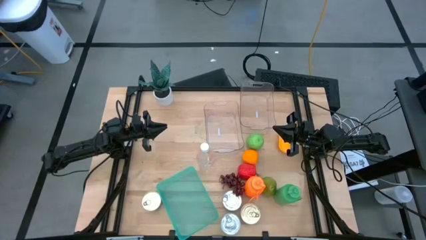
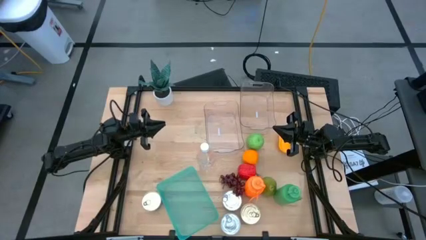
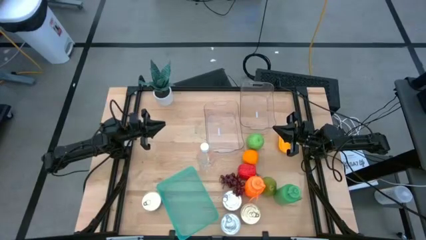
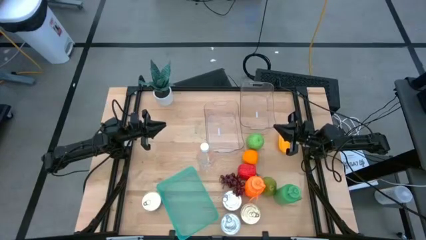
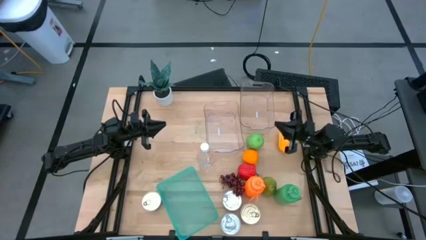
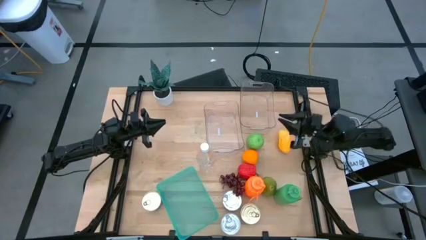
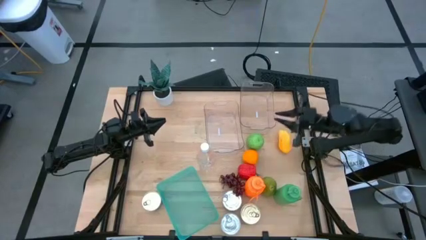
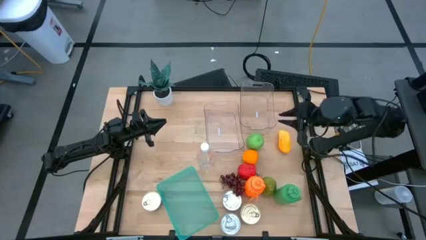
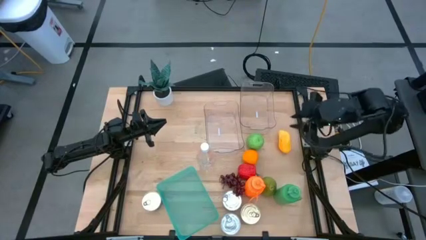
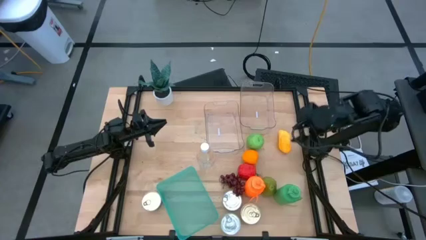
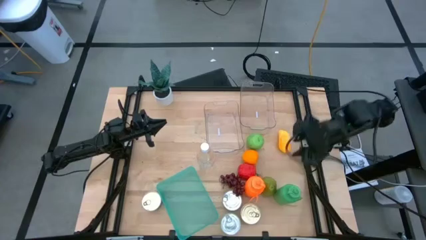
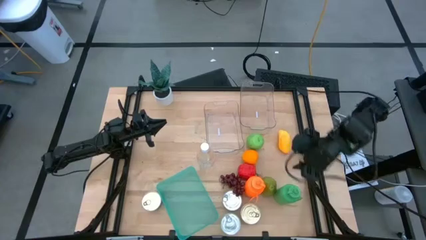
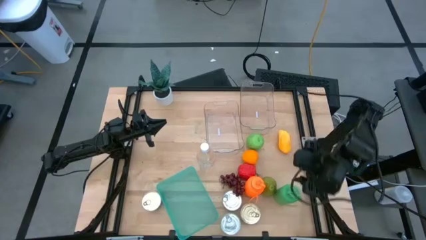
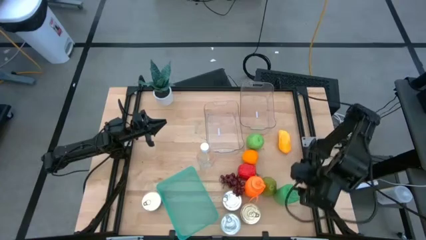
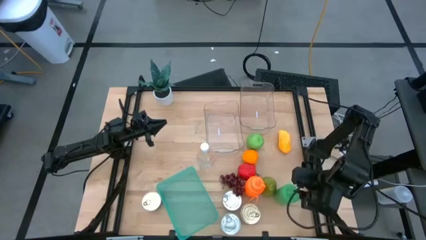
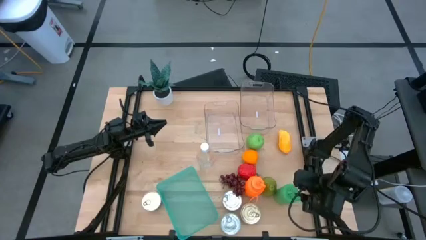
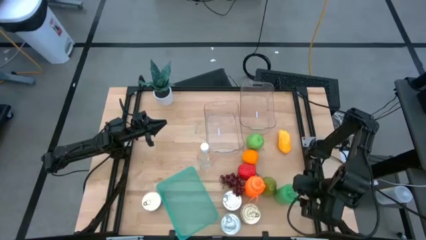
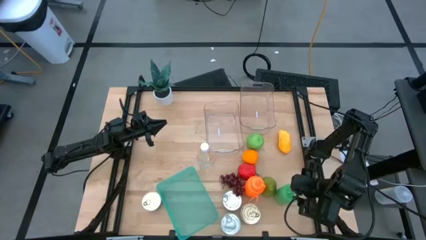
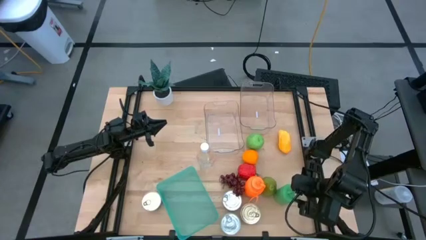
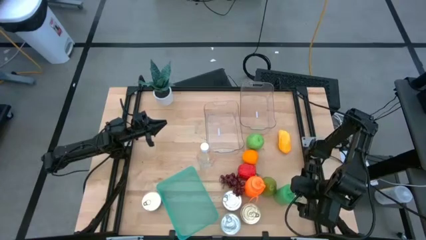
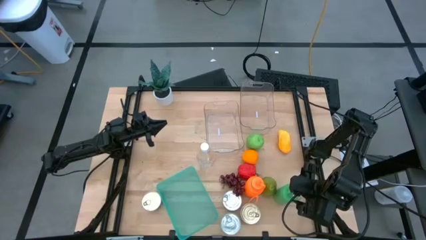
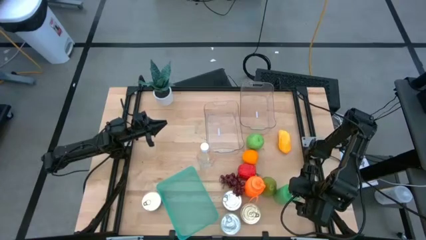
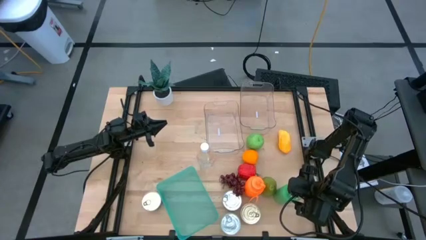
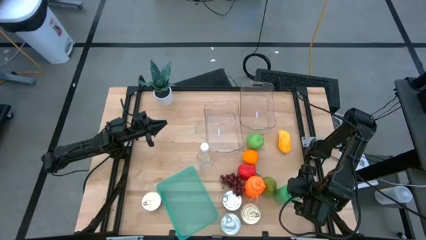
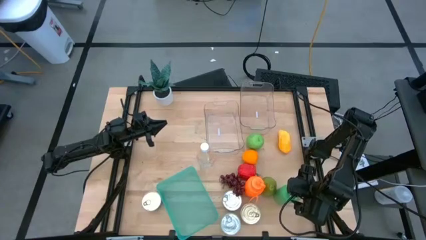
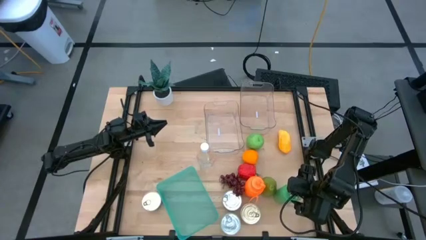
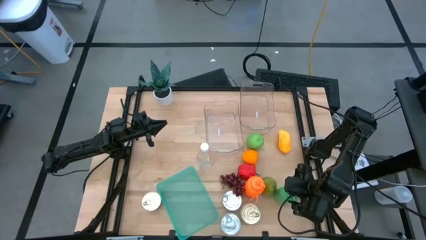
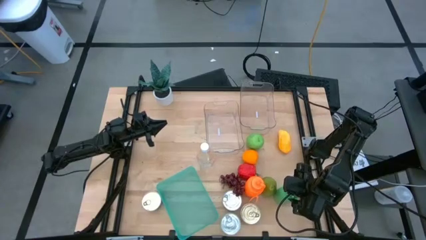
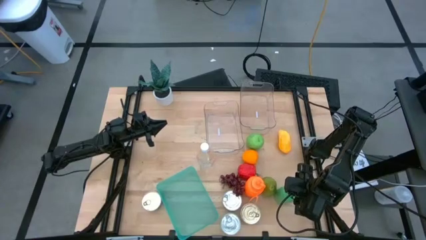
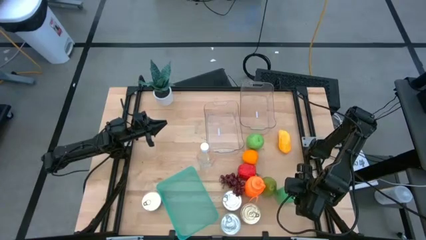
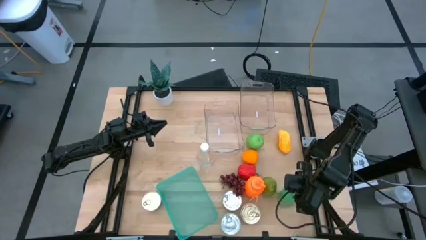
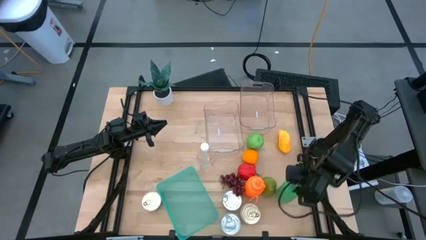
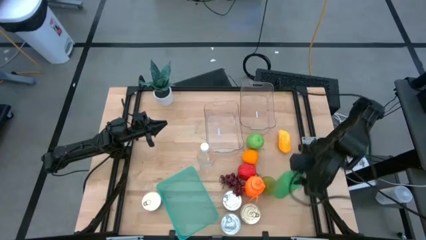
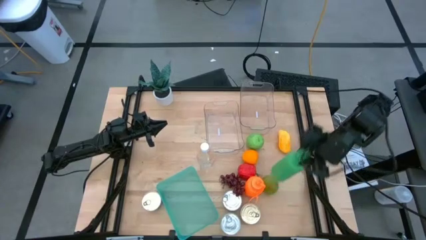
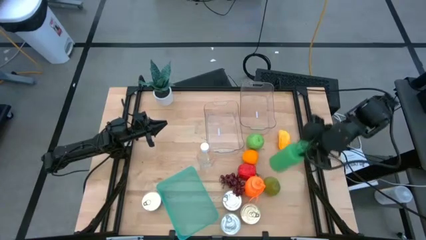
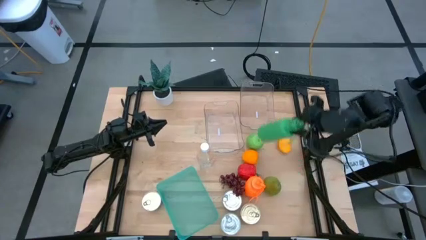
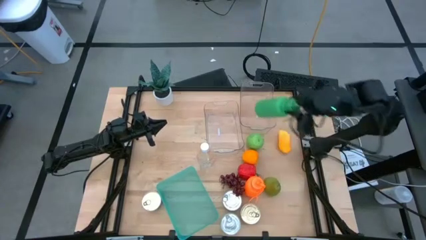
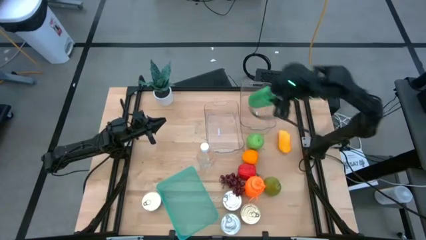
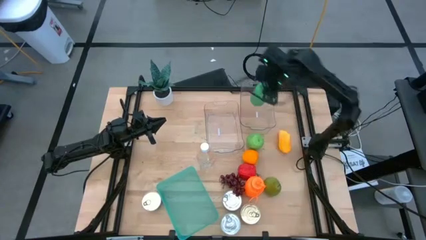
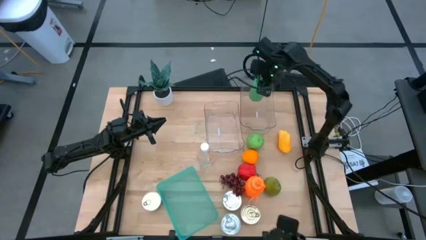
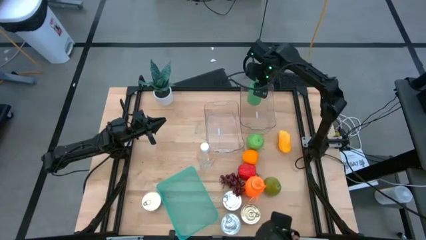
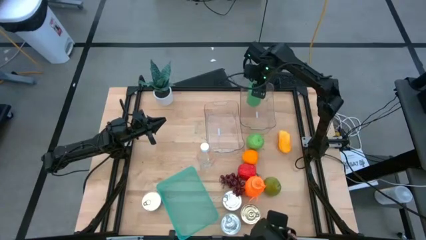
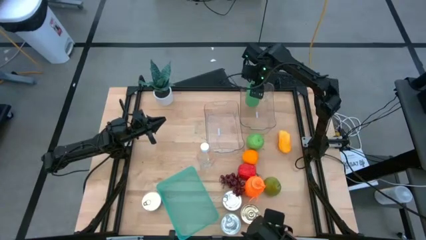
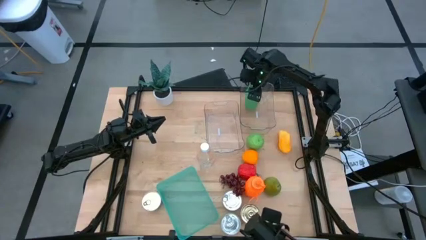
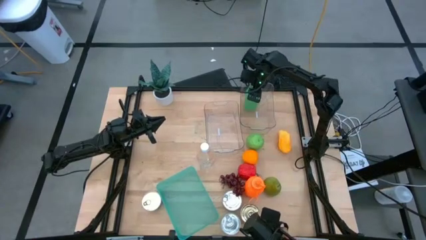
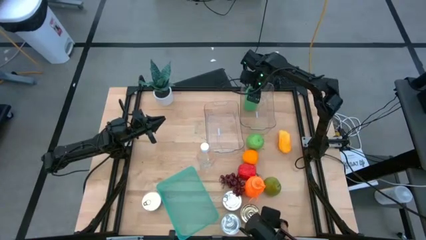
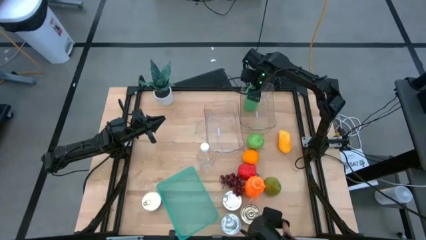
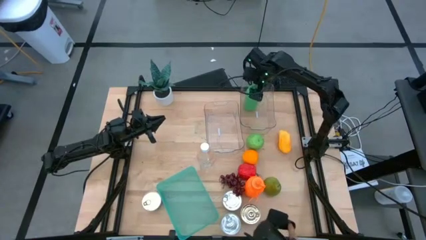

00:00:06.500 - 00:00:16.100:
Task: Pick & Place Food Item
Put the green water bottle into the top transparent bin

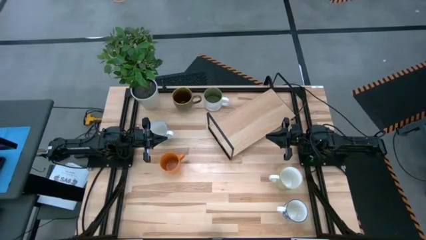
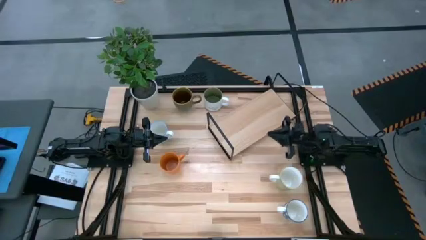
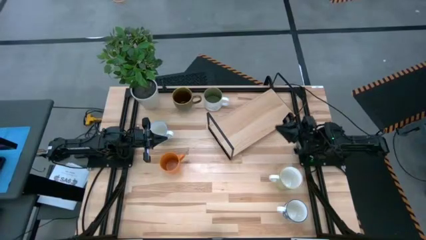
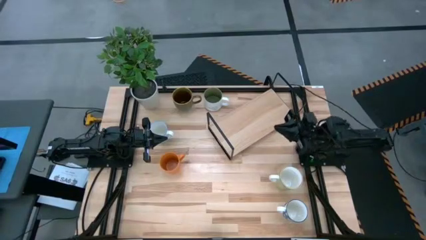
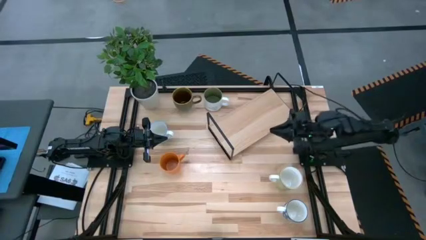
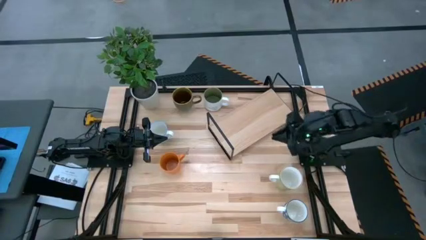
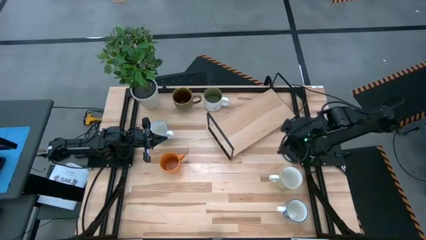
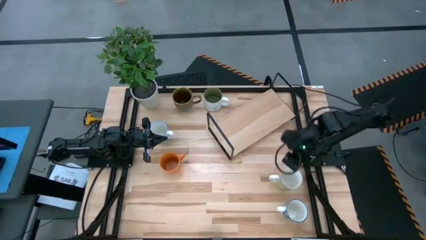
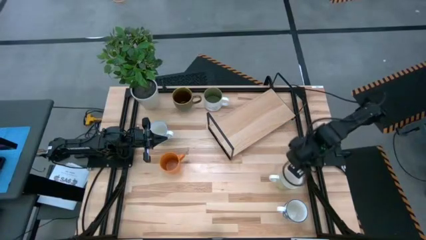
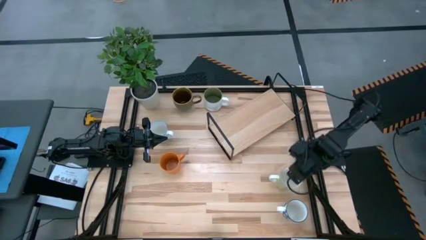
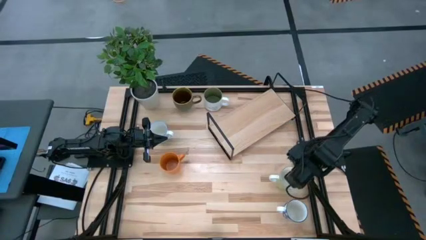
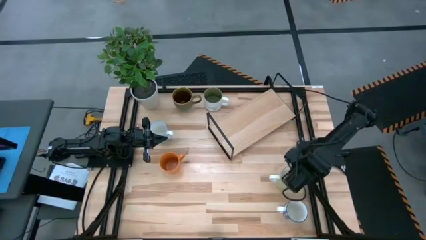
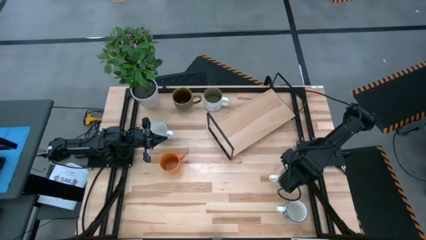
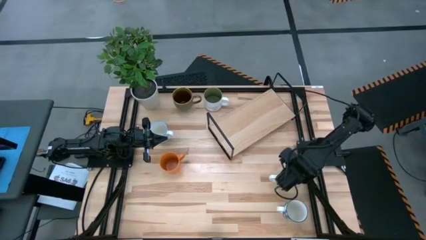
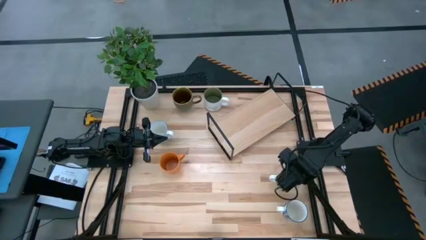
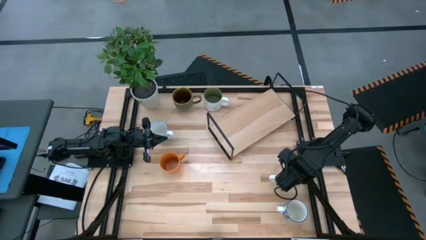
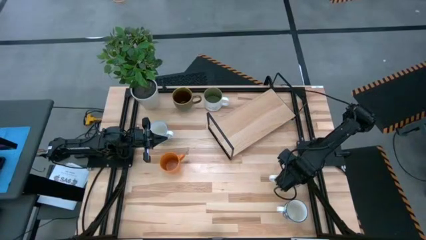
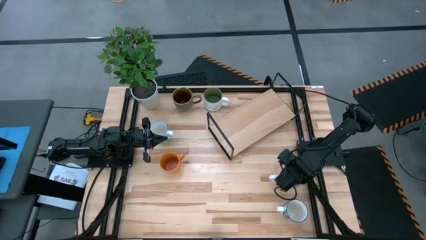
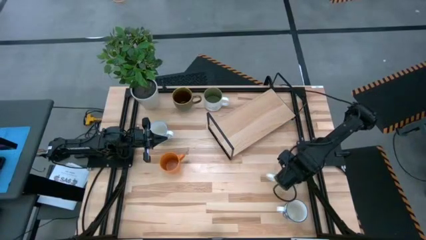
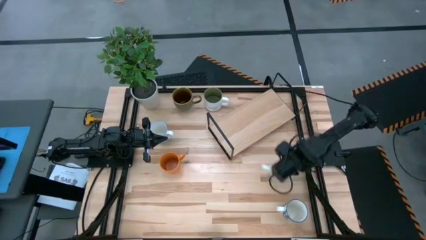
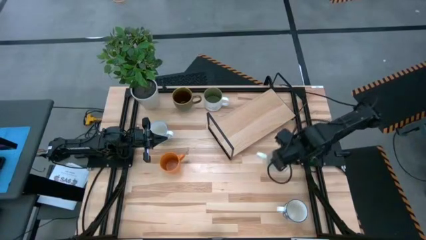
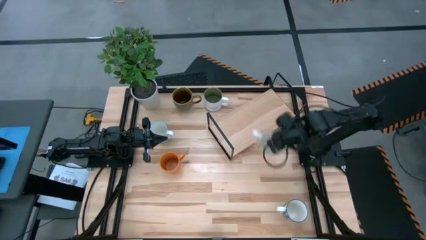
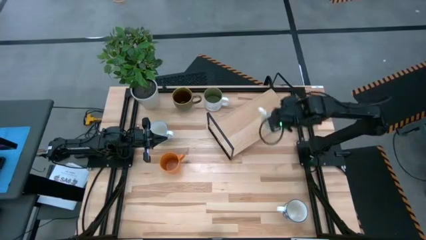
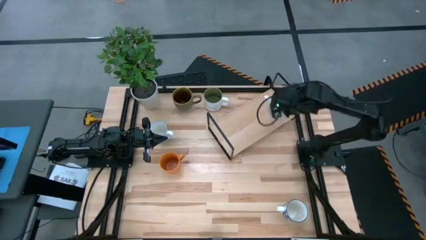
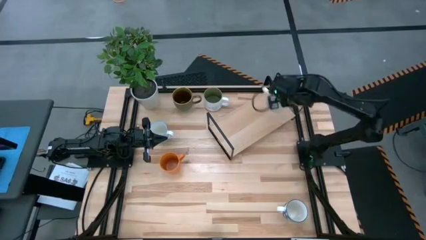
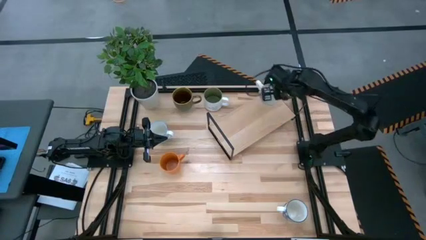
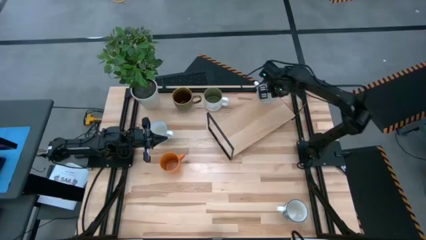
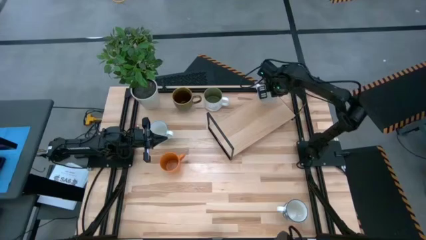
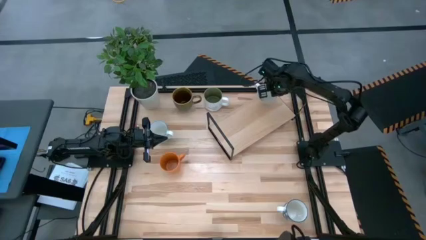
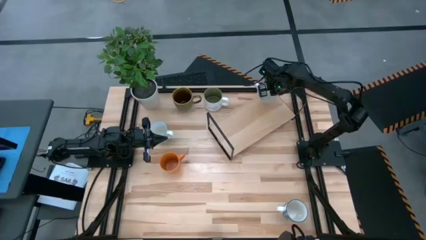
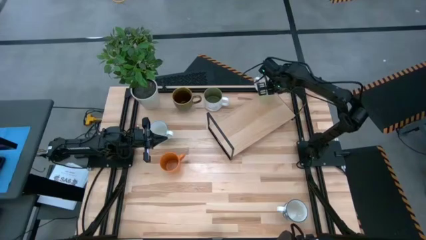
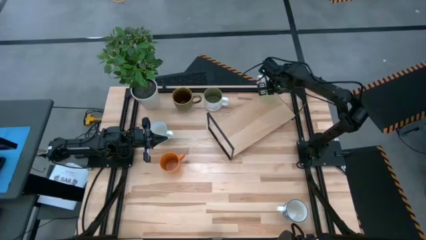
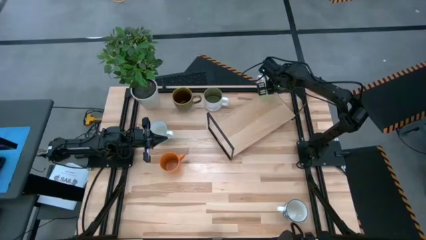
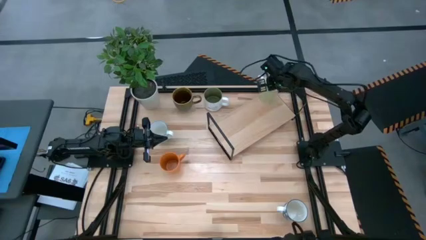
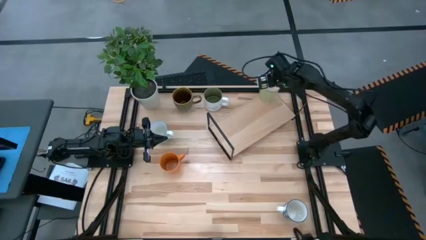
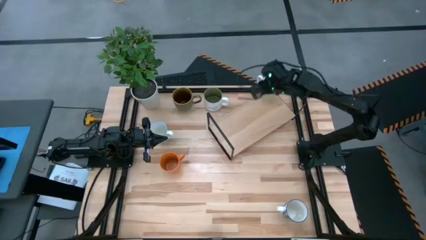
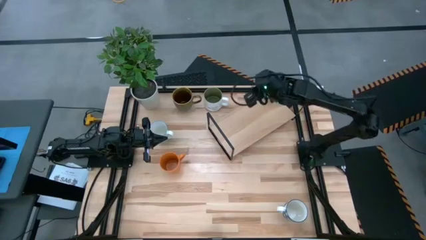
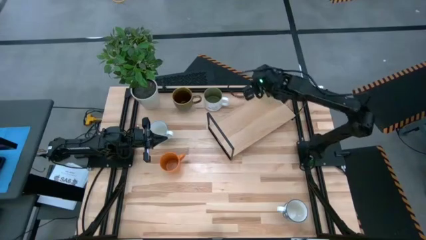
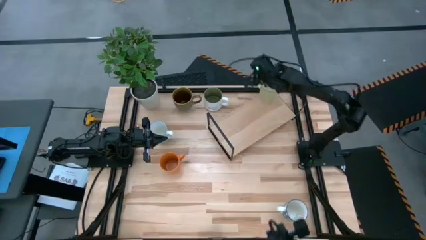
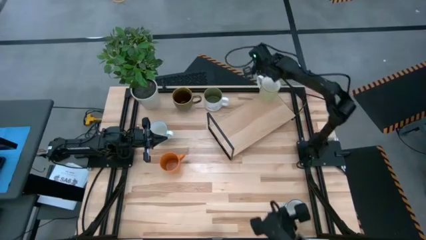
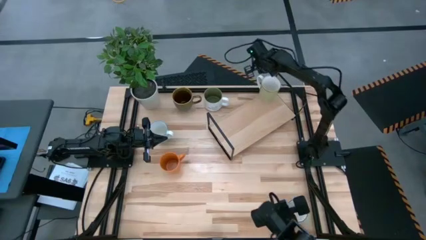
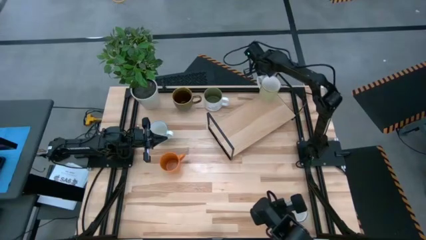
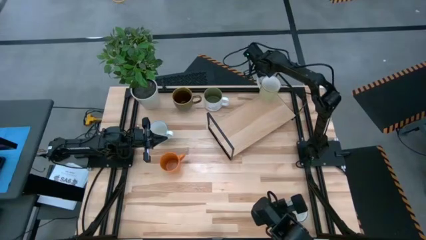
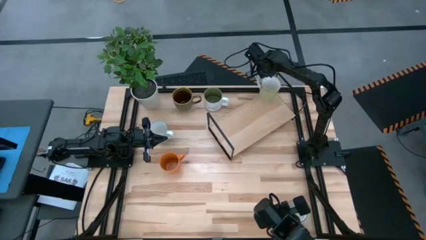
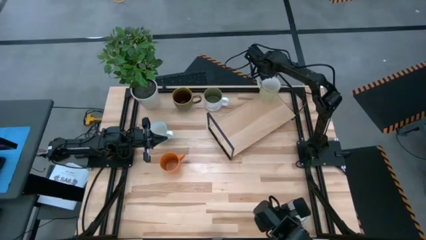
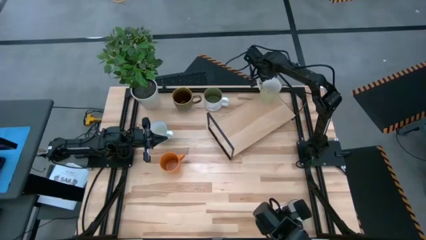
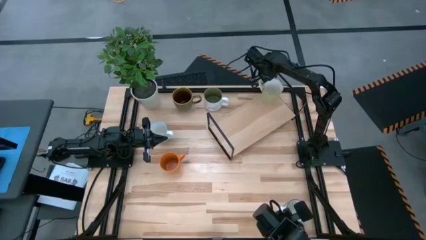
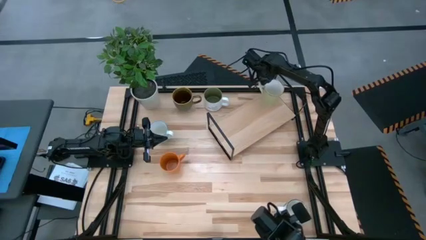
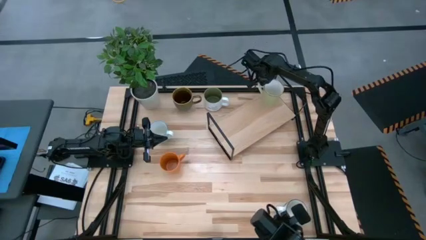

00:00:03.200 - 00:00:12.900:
Task: Place coffee mugs
Put the yellow mug on the shelf
